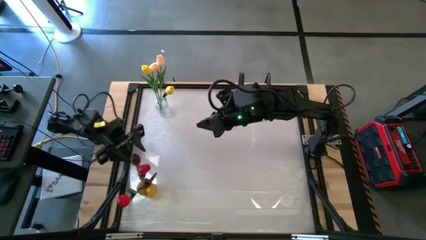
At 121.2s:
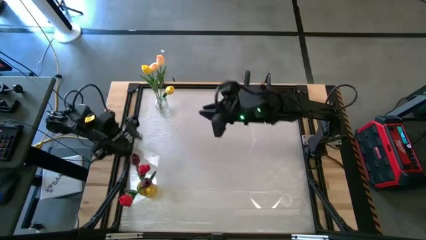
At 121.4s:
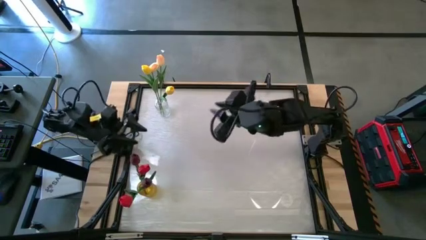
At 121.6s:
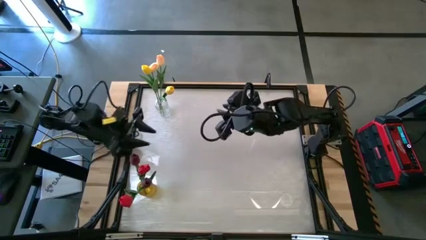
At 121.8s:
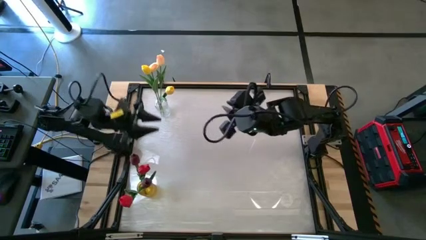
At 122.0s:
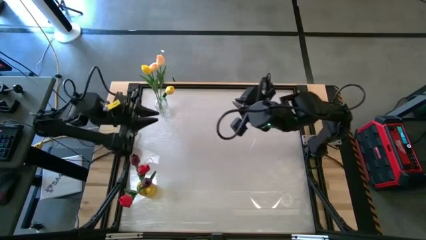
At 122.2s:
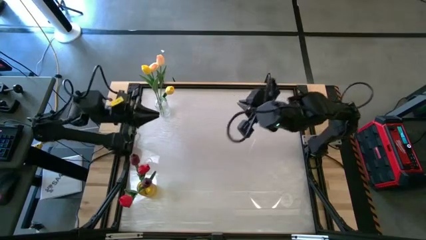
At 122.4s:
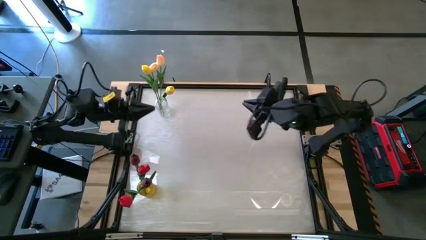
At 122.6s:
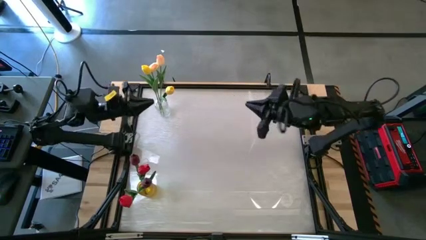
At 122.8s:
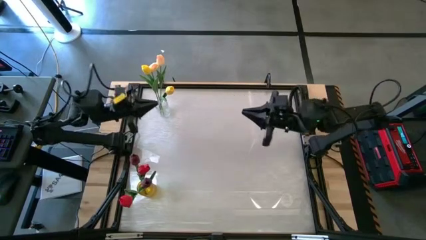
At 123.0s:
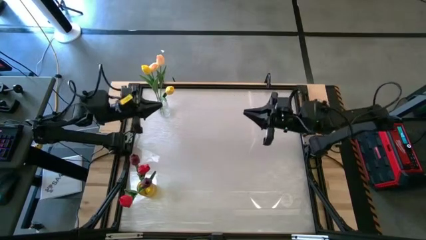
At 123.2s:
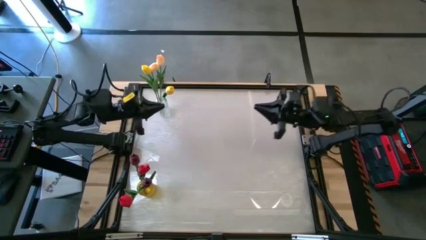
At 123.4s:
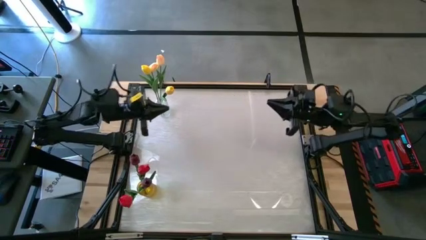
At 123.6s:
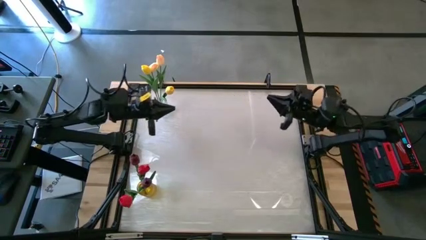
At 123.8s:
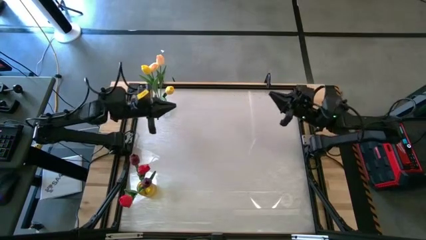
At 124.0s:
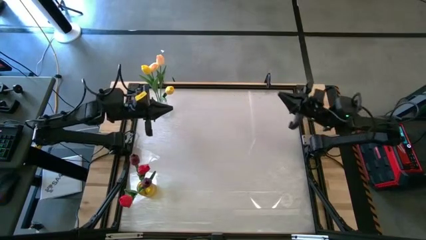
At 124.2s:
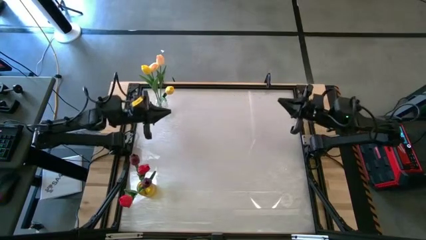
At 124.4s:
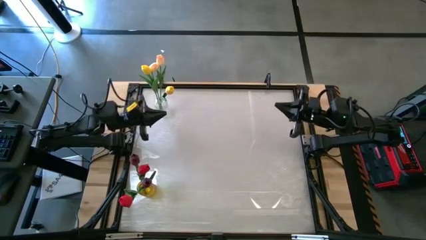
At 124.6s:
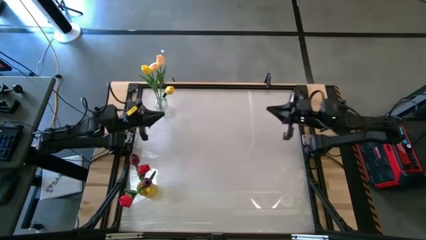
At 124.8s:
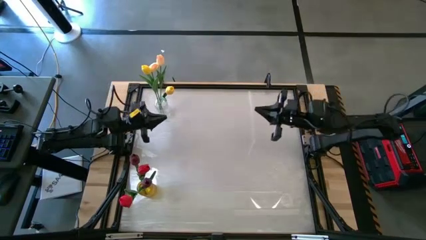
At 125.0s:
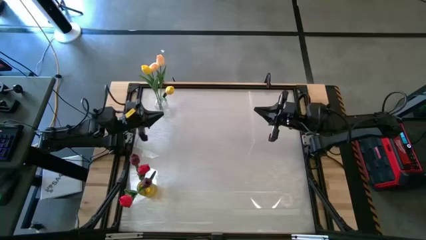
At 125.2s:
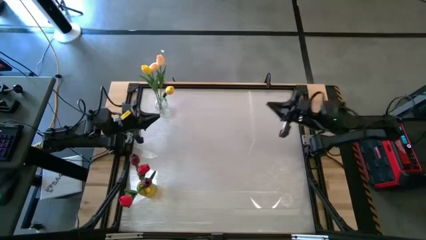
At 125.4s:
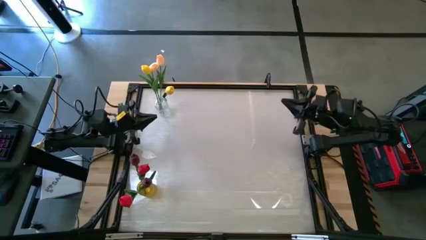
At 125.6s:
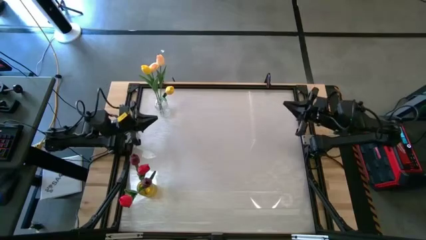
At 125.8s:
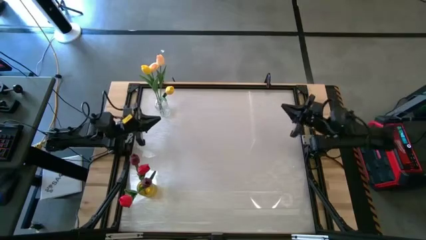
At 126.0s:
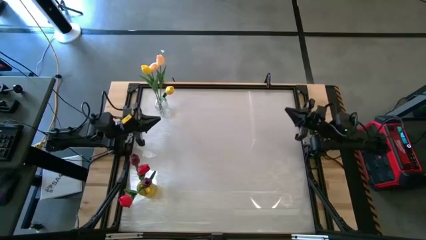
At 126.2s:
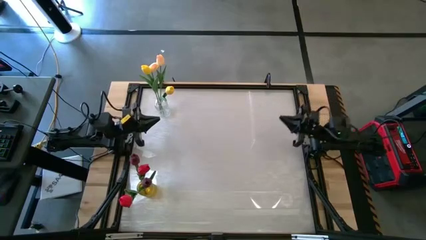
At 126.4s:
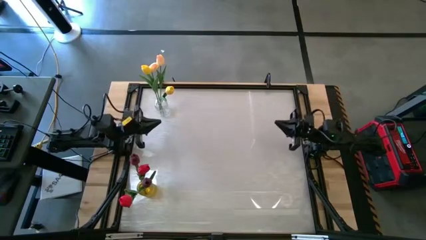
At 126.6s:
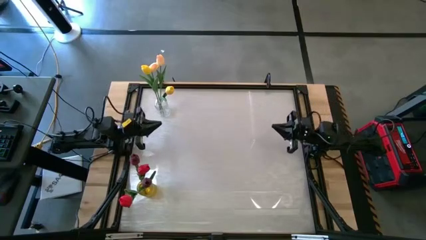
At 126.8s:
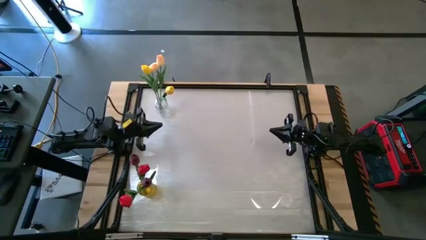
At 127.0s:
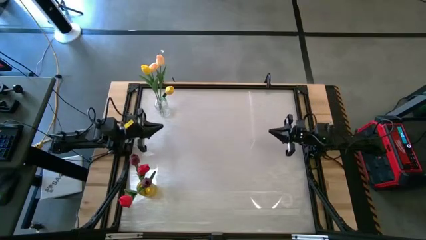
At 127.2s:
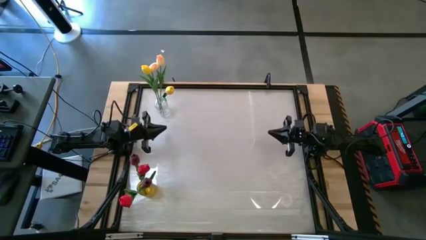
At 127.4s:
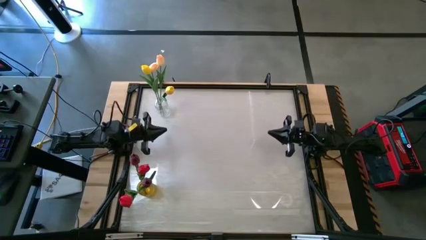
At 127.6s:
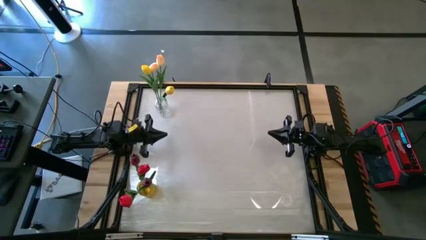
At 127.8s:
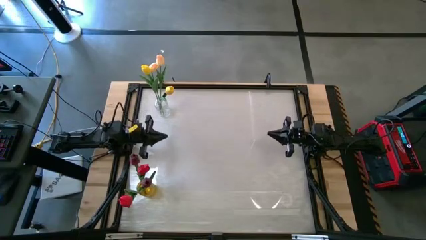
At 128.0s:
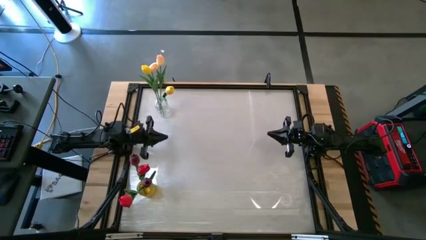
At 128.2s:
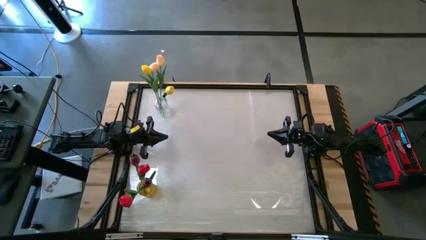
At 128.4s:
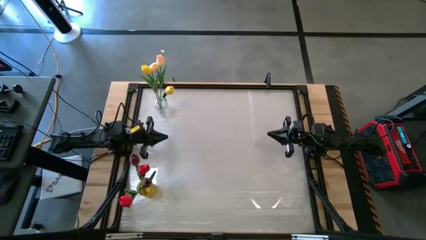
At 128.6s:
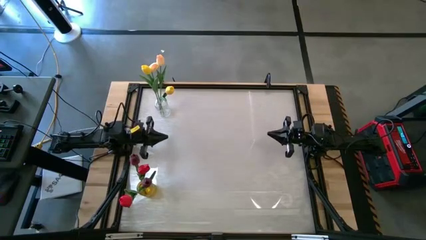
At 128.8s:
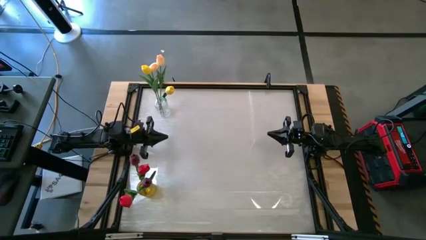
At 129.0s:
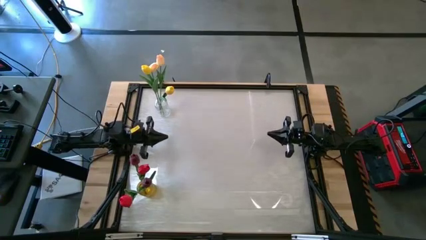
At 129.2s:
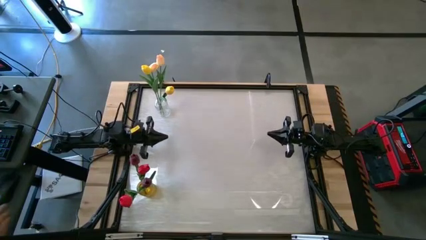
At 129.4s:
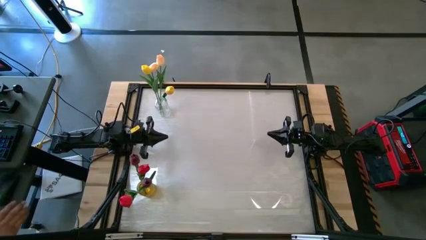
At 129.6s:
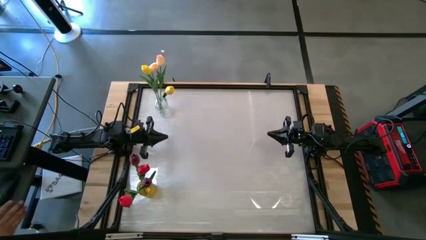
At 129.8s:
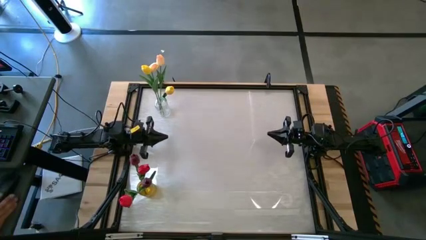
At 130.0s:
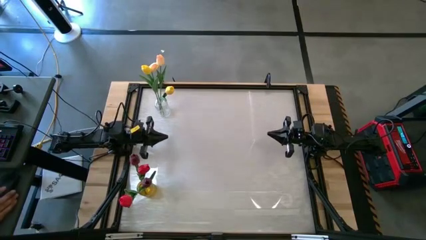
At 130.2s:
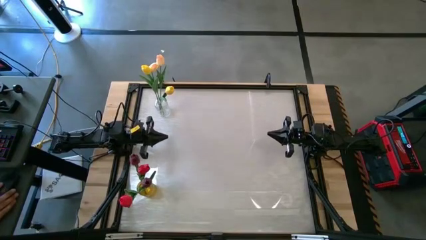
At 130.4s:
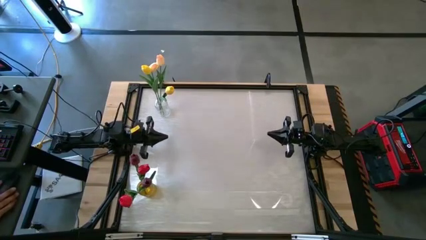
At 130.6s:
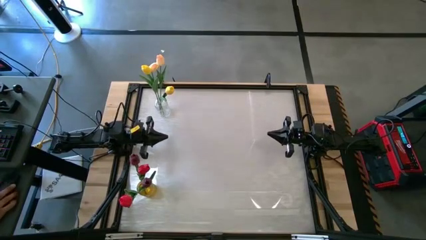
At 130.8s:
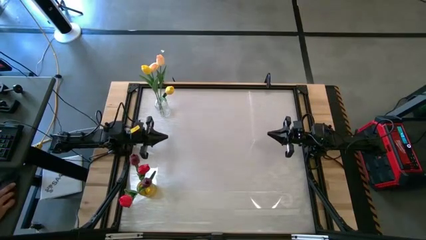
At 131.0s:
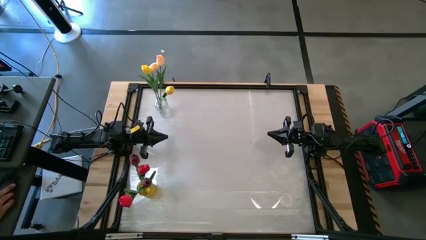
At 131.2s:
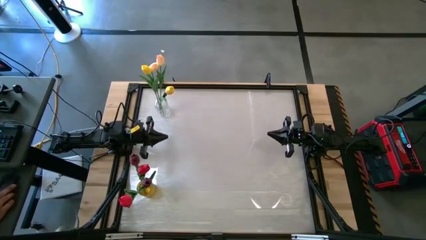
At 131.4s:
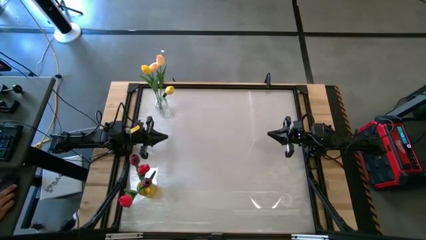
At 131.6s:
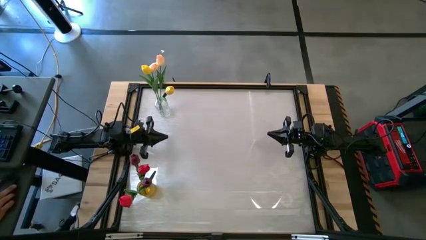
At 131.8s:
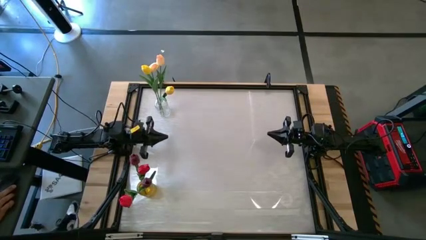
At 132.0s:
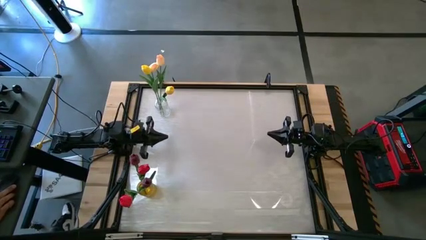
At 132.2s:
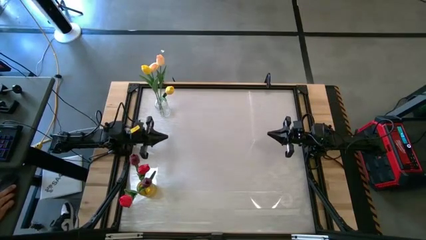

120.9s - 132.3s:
Task: Sort flowers into vase by color
Return to Home Position

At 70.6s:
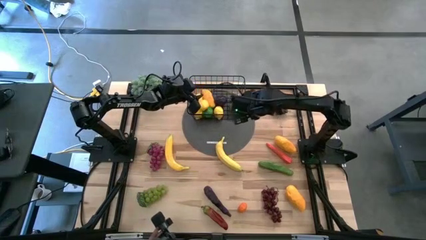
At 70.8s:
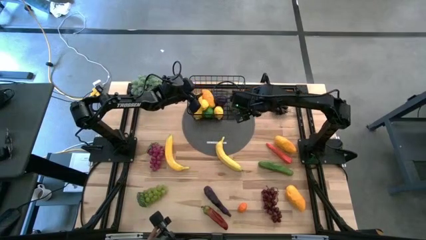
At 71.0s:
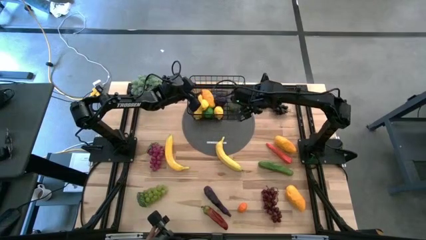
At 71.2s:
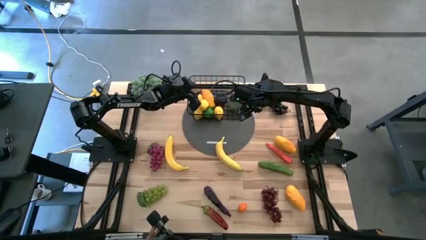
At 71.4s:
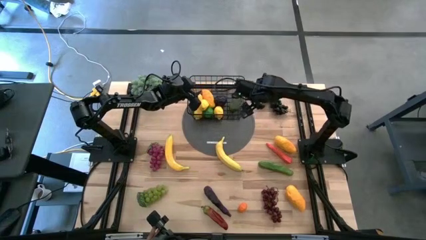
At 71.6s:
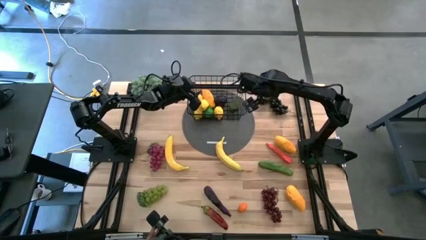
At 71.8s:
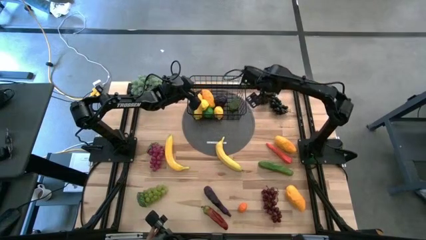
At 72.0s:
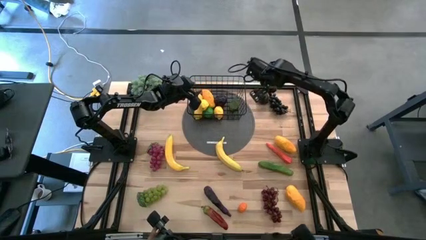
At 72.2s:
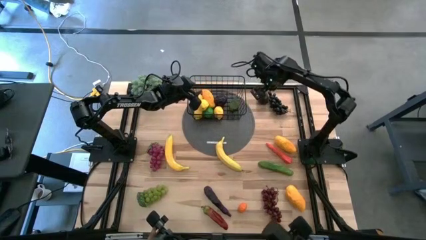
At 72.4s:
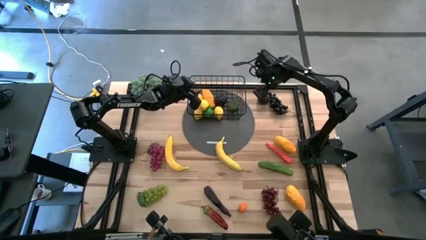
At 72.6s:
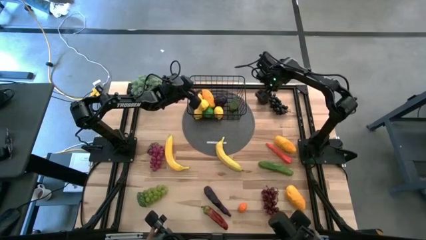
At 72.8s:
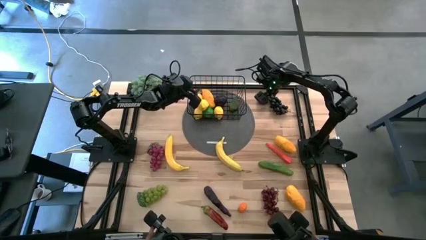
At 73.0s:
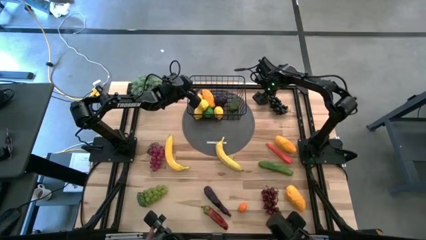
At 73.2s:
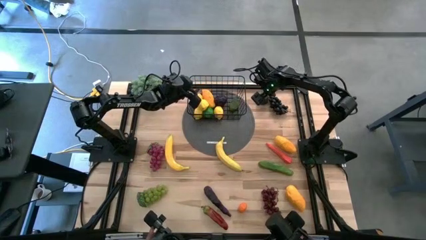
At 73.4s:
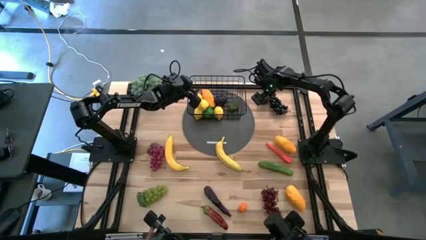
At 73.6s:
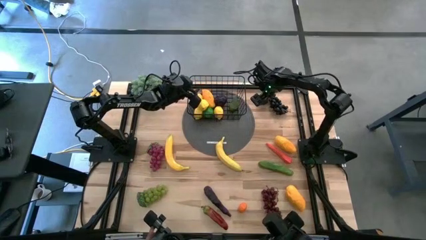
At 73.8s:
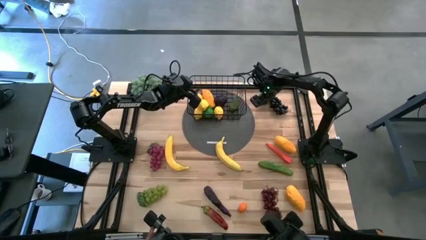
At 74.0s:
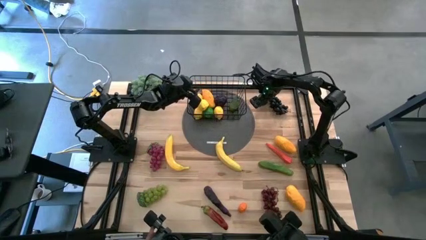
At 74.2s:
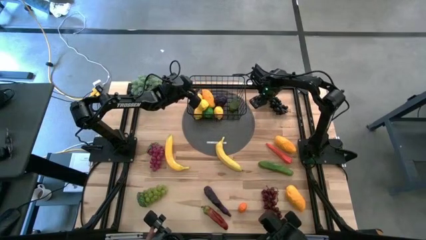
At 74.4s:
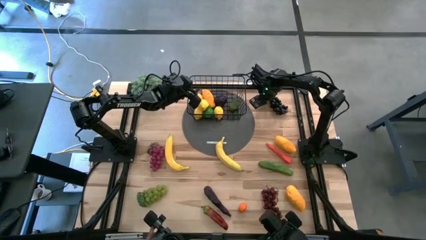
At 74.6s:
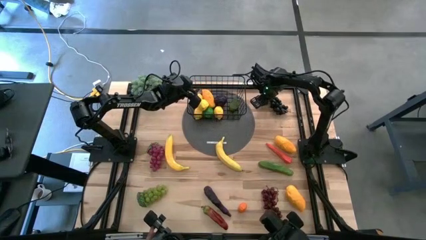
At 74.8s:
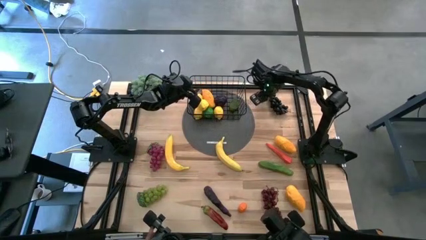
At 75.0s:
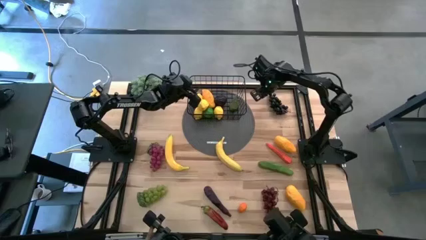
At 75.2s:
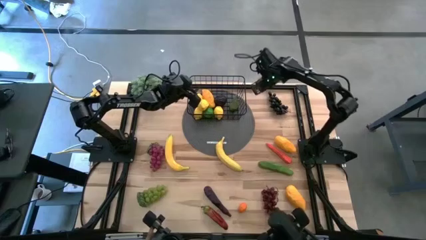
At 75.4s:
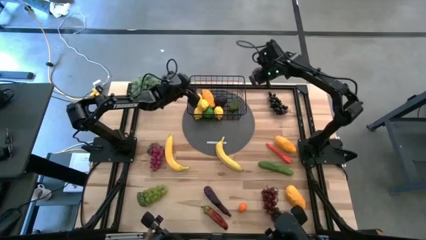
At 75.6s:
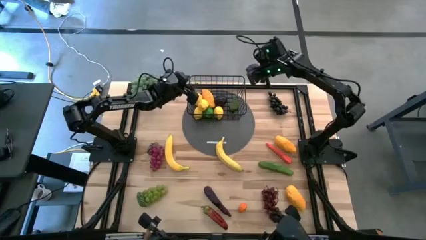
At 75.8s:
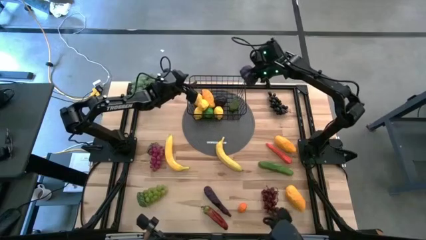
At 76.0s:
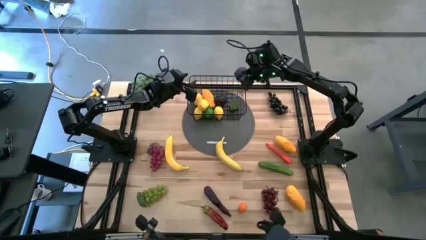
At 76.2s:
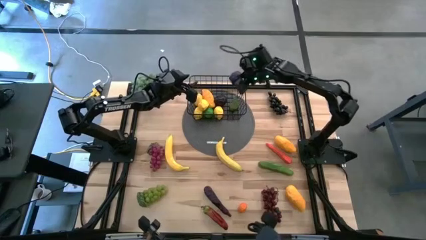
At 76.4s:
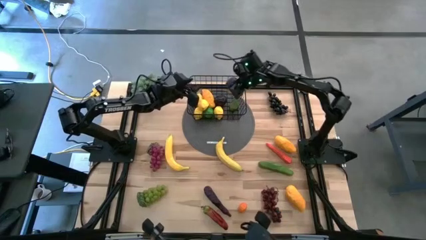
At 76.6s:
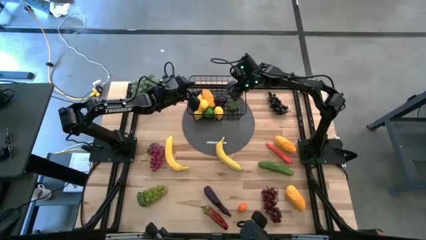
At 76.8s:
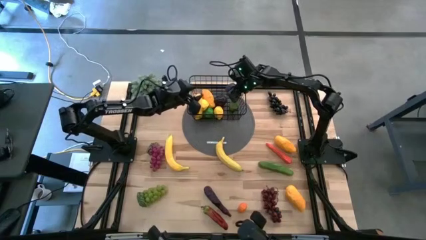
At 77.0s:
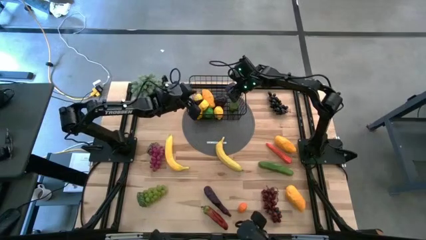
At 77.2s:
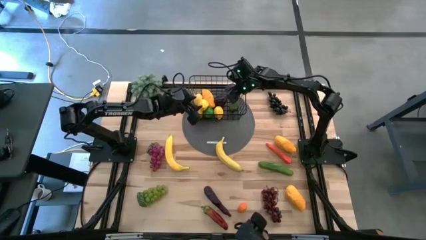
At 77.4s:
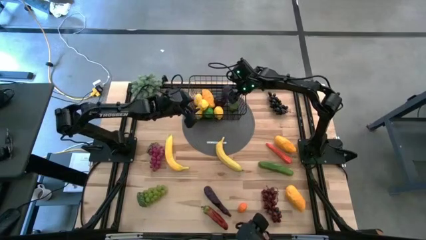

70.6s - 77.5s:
Task: Build produce basket
Put the purple plum into the black wire basket
